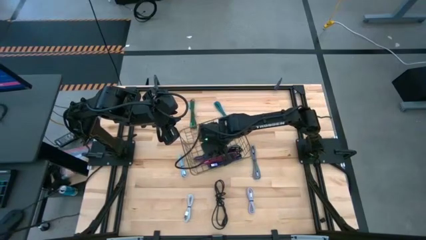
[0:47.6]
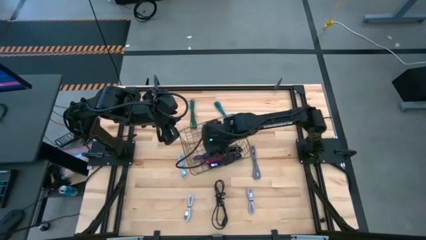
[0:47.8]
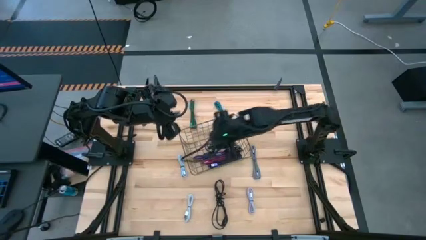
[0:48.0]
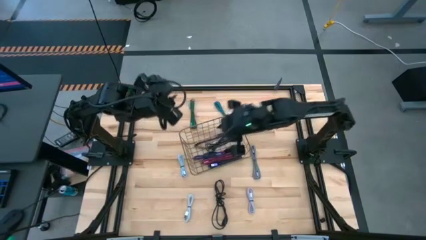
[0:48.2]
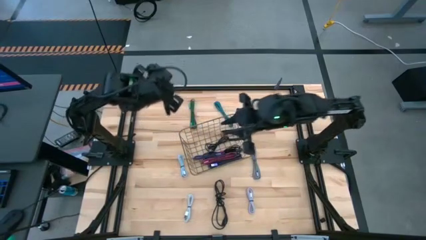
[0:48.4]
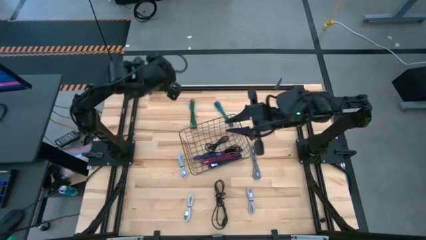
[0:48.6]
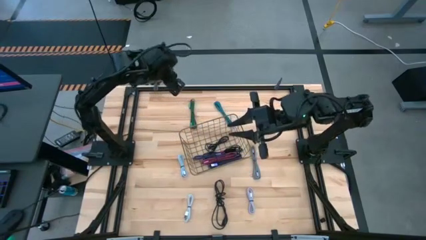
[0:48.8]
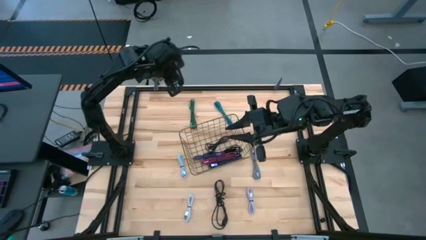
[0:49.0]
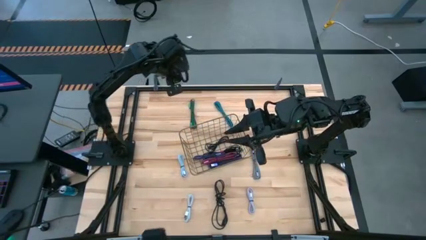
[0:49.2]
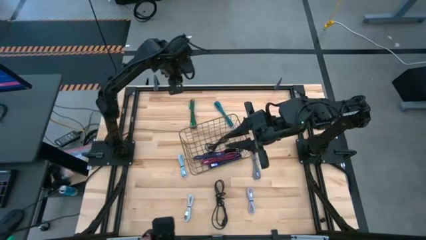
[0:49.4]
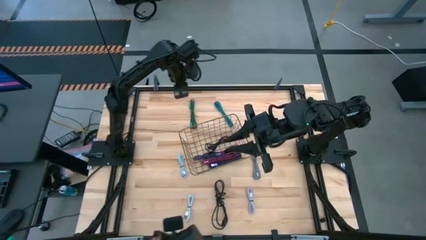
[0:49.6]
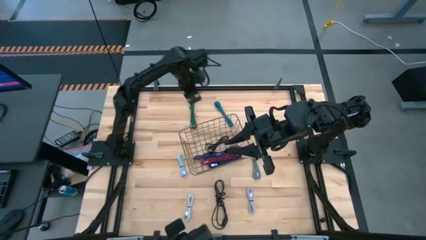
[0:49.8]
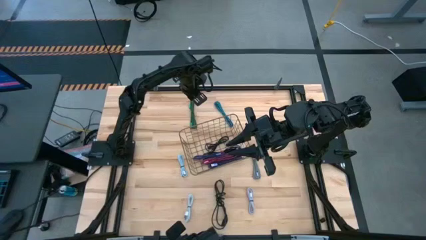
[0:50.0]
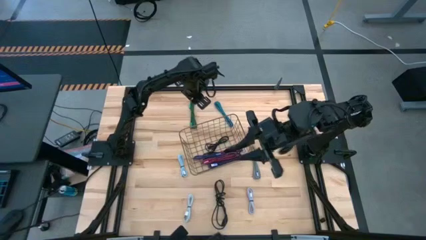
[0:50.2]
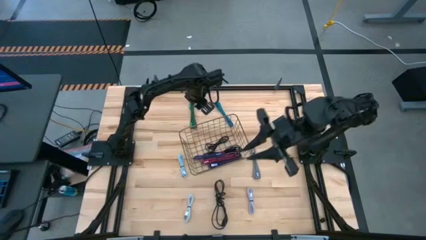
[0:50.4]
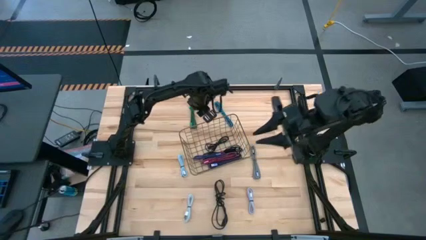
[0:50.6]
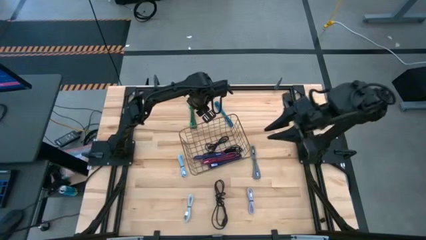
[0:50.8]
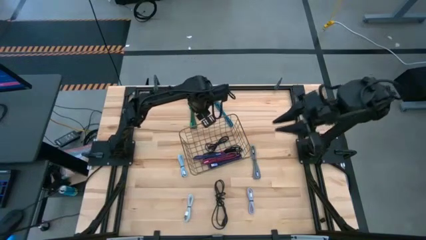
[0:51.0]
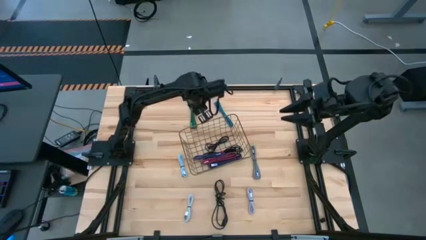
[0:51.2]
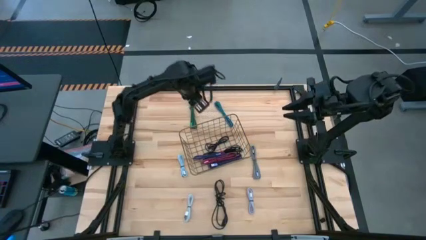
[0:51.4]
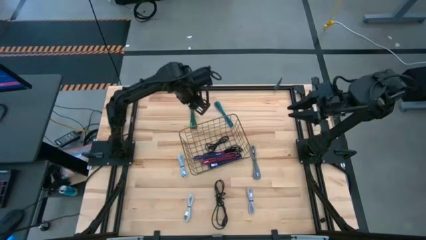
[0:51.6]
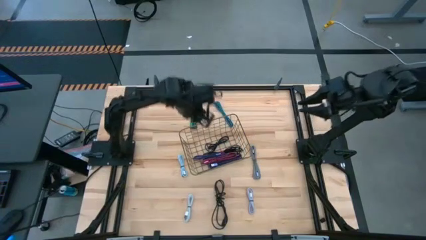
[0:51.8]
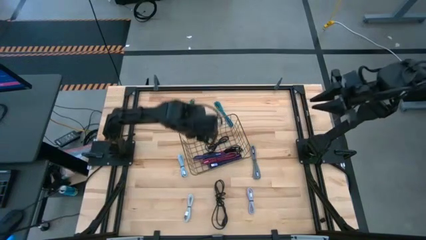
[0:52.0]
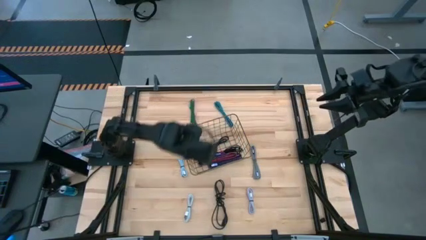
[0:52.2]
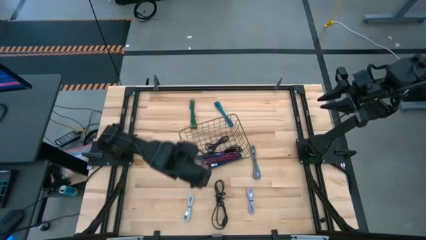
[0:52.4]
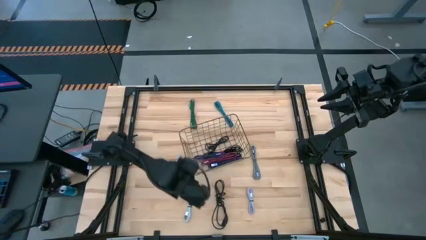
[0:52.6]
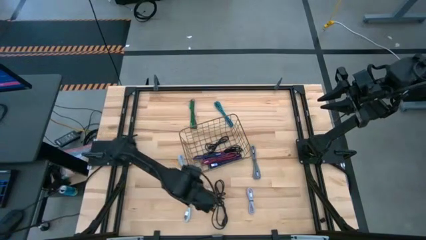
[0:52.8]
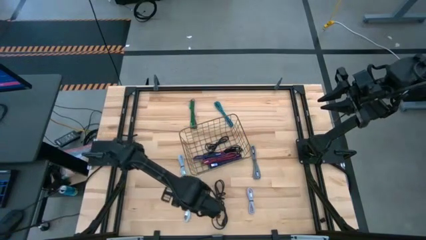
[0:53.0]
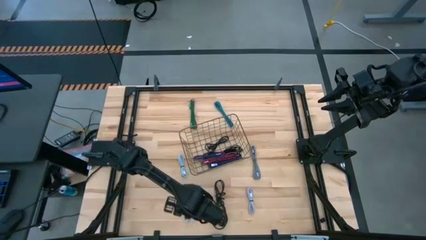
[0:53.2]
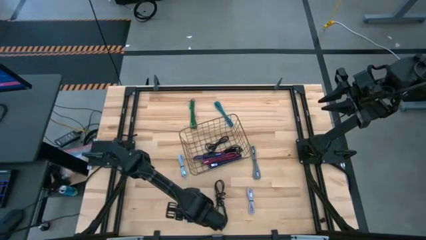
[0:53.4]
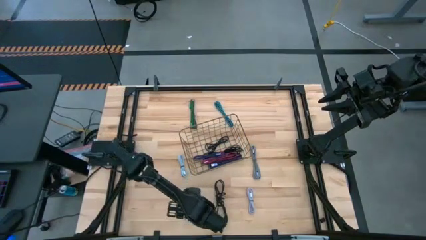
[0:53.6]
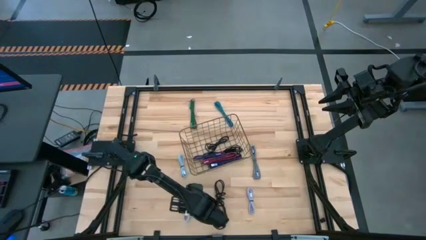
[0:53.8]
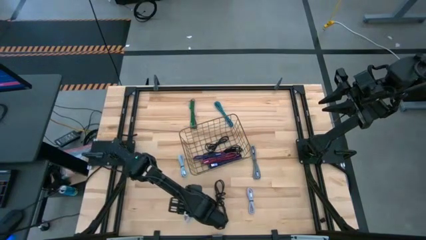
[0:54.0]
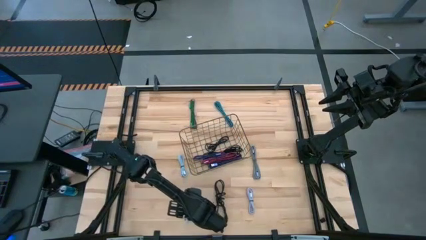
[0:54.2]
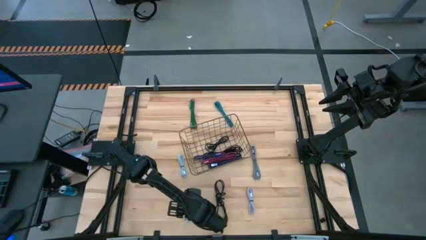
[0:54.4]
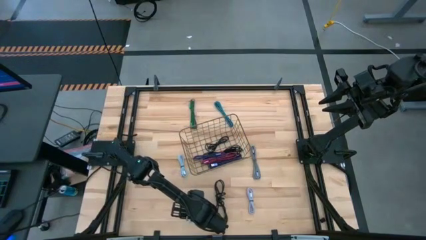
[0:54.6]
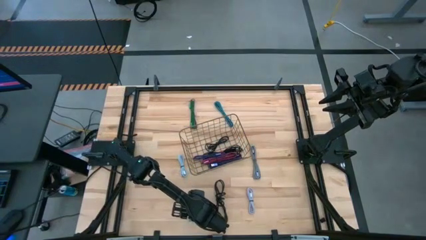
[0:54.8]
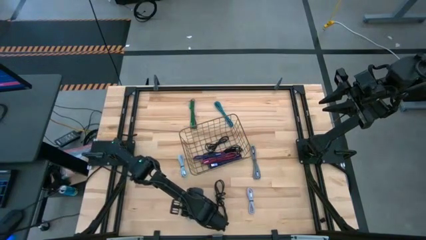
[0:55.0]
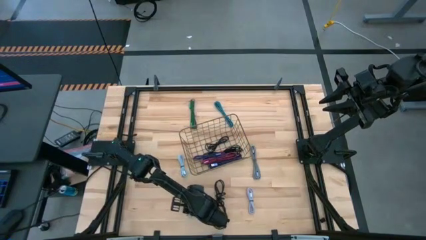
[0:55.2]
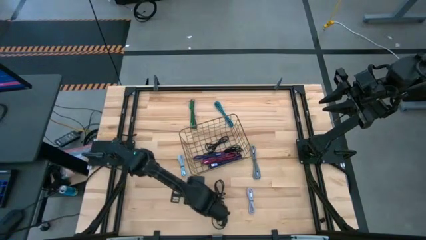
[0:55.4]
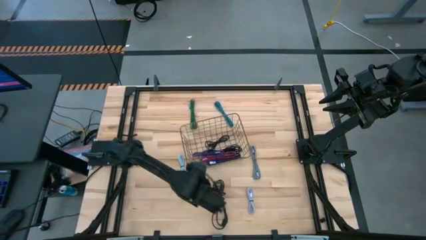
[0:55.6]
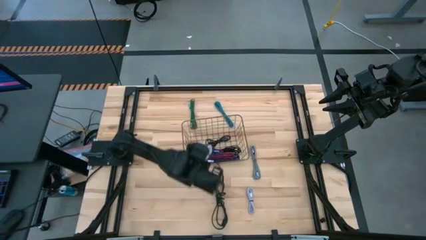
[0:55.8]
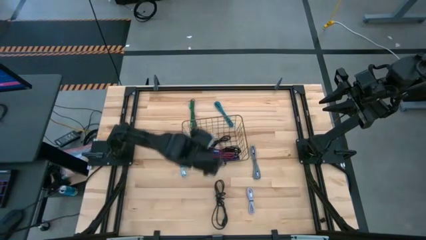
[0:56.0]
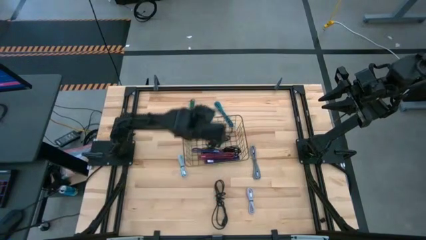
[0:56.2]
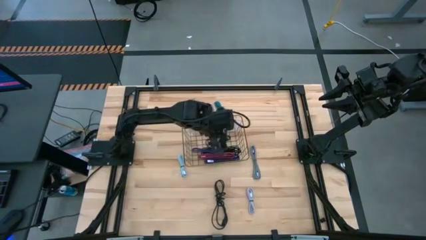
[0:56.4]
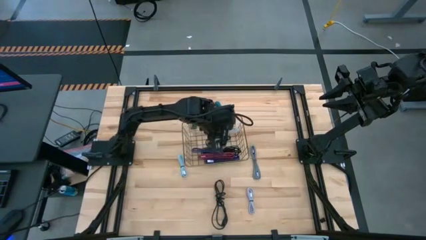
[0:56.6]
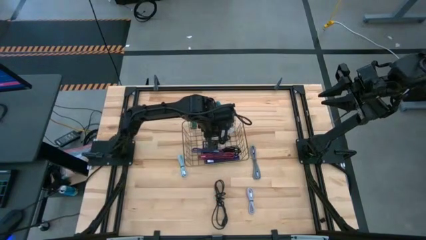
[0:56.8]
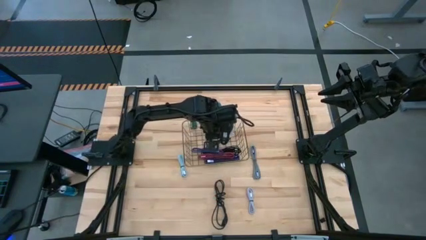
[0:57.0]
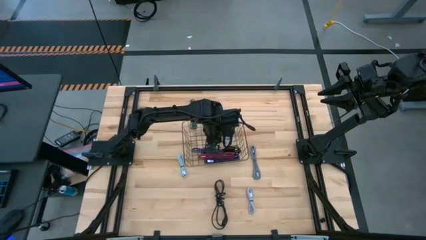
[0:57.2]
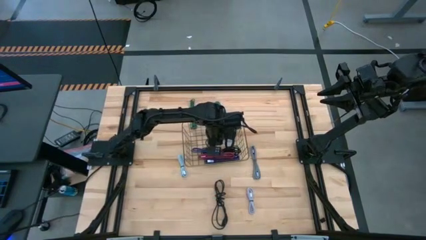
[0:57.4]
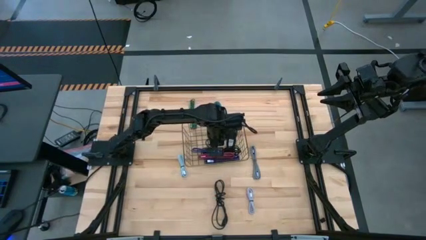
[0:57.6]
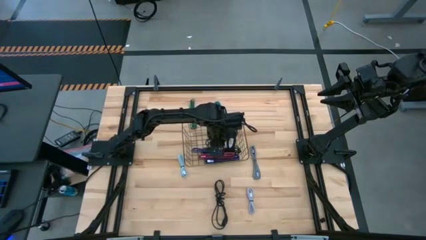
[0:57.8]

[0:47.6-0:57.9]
Task: Pick and place USB-C Cables
Put the white USB cable into the gold wire basket

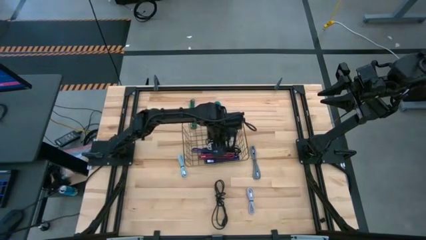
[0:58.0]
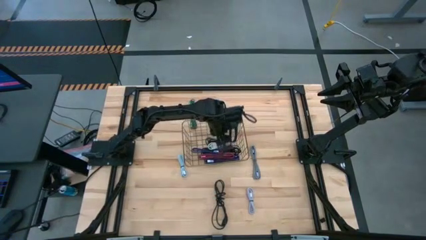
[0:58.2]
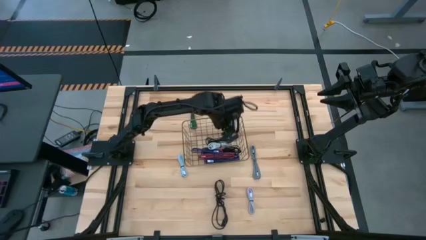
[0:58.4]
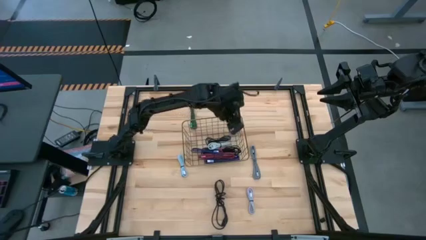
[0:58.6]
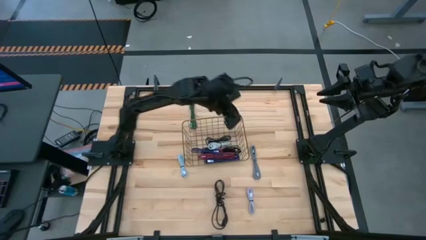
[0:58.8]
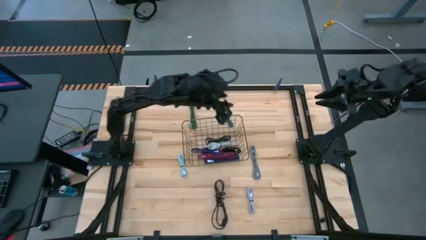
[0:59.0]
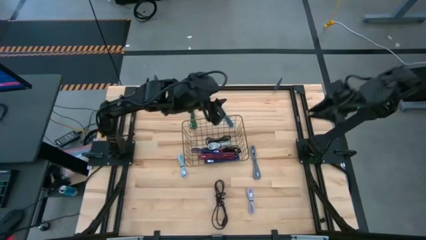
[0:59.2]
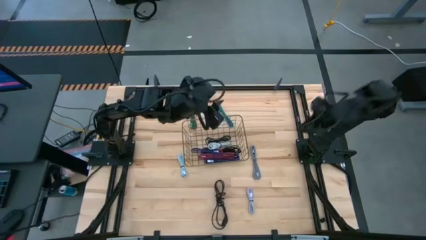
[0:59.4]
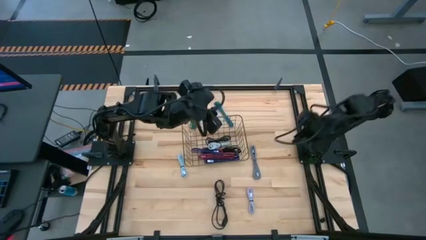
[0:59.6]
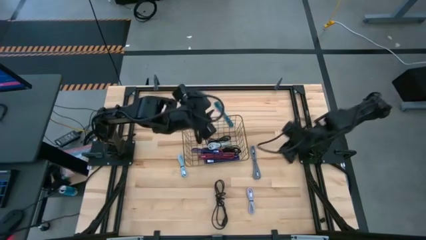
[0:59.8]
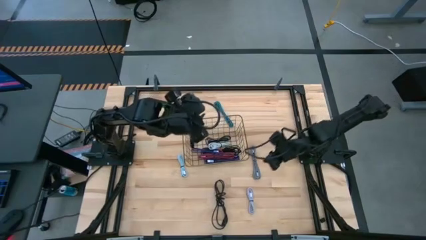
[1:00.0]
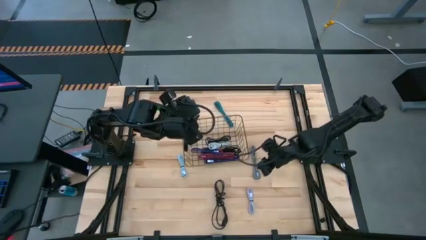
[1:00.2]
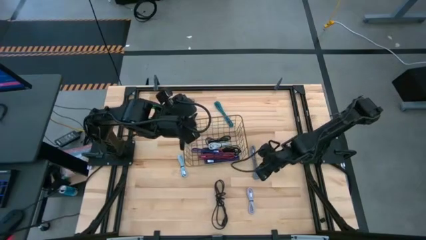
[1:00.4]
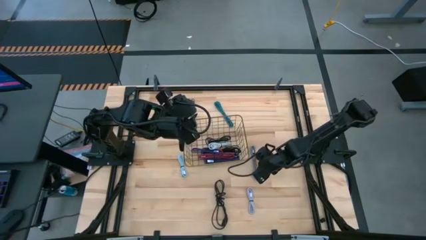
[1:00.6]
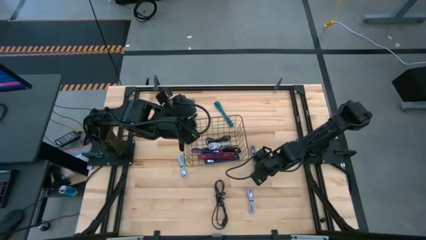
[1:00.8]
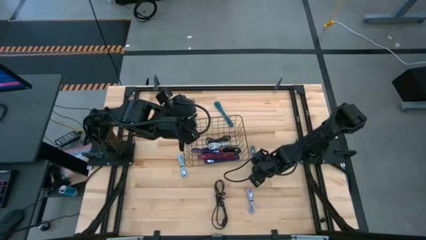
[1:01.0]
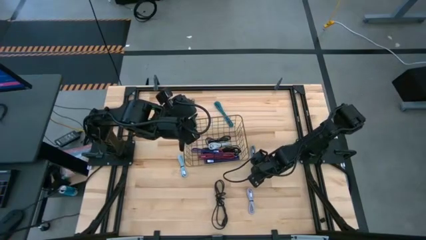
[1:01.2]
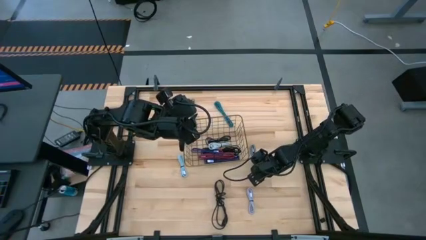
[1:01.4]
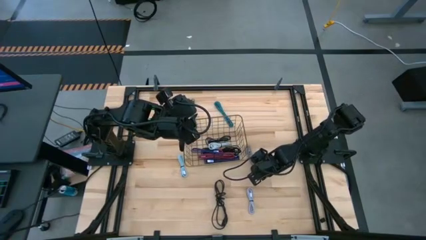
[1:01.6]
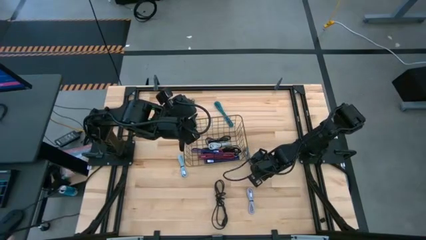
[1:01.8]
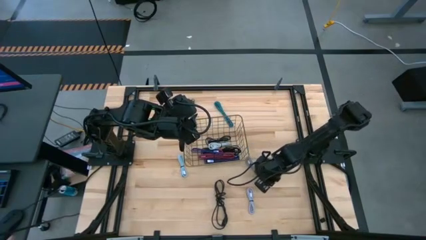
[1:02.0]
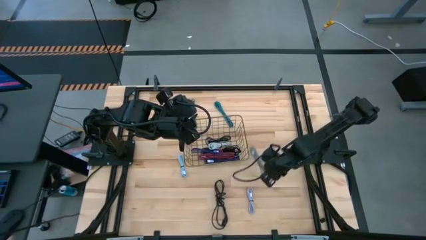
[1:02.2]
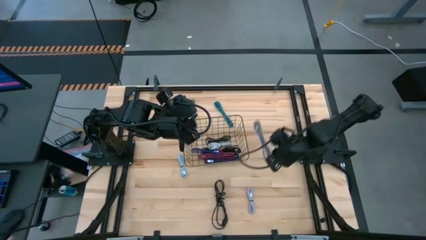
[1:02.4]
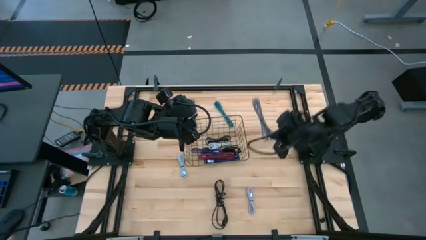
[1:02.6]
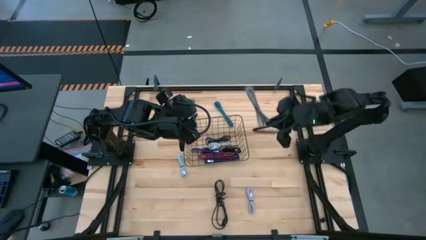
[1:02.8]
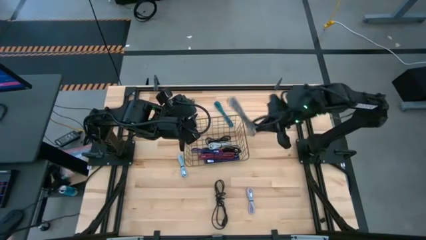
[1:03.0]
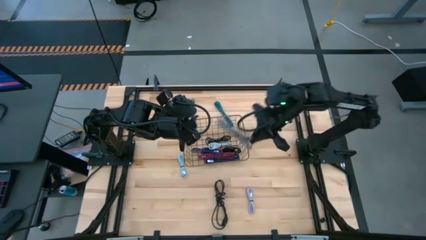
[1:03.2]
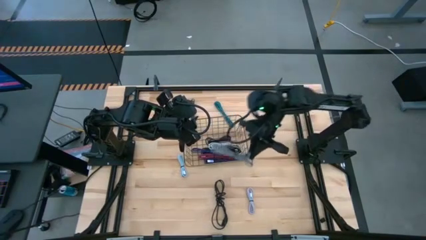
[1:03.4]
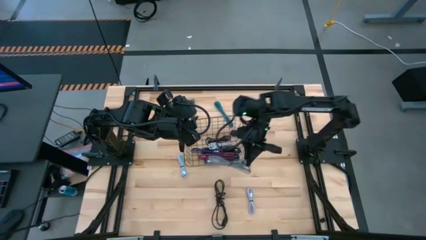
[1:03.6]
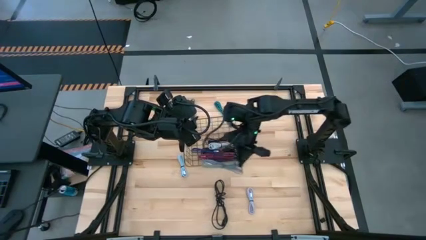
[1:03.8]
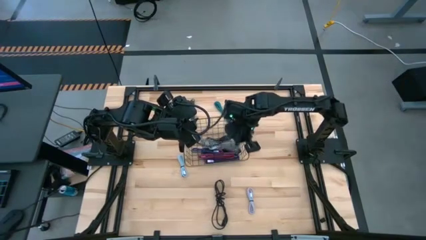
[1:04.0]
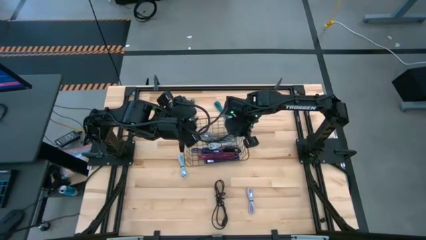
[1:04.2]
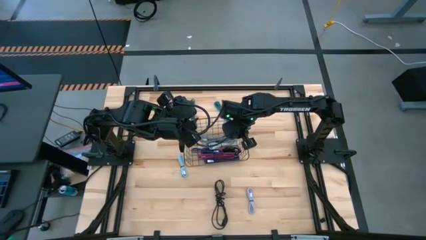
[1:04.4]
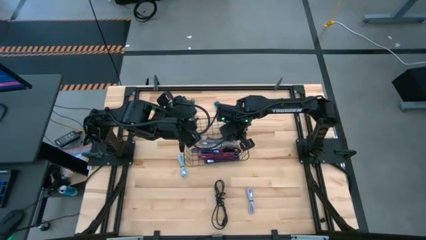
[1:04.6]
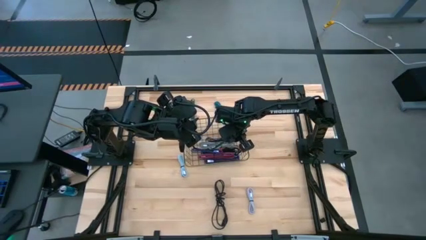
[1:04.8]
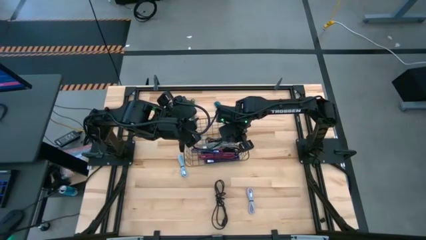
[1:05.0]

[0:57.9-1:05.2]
Put the black and white USB cable into the gold wire basket
